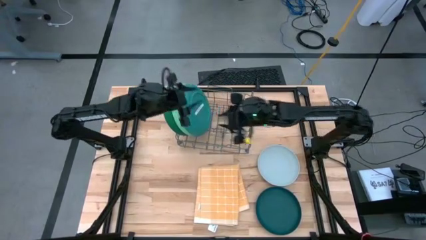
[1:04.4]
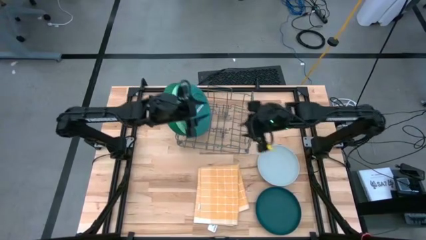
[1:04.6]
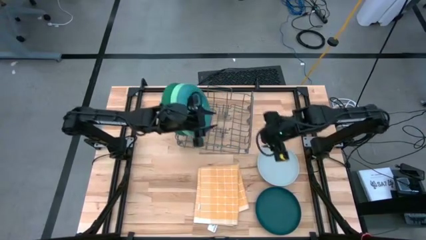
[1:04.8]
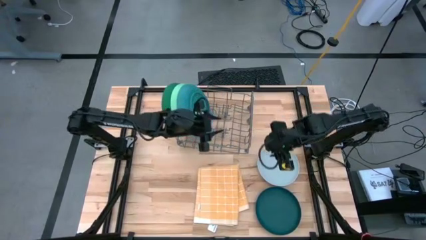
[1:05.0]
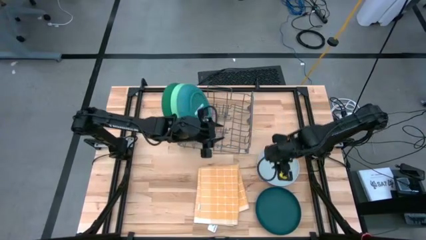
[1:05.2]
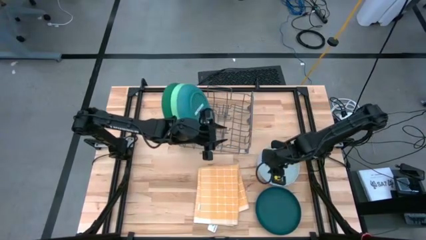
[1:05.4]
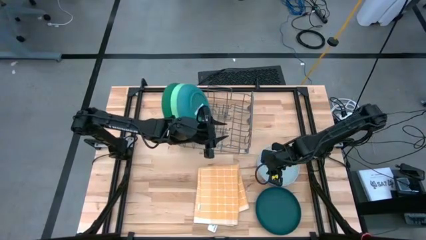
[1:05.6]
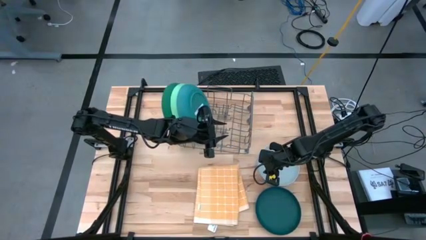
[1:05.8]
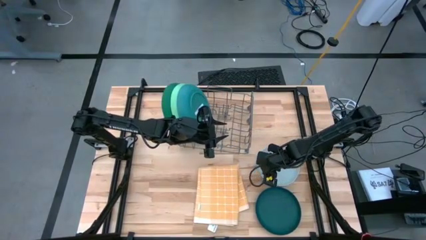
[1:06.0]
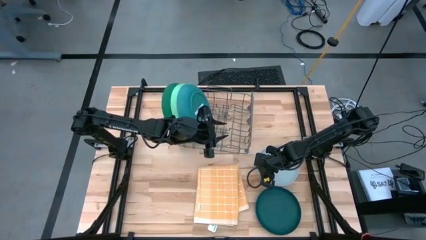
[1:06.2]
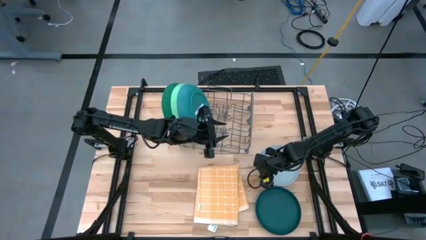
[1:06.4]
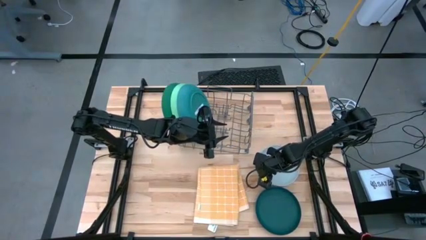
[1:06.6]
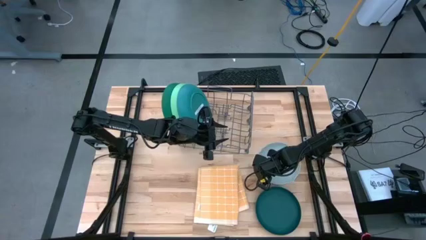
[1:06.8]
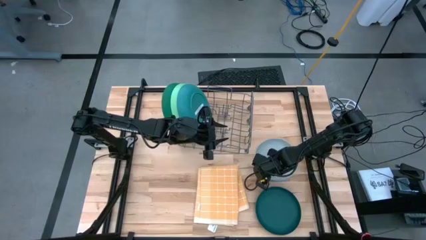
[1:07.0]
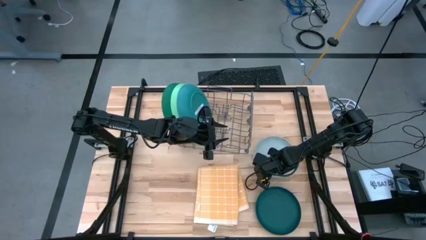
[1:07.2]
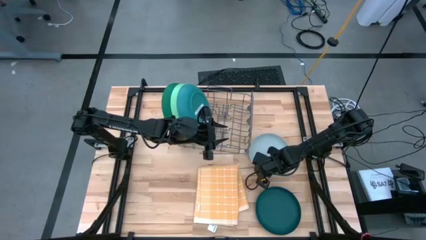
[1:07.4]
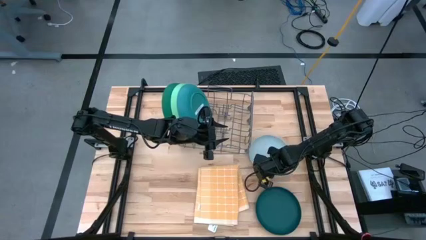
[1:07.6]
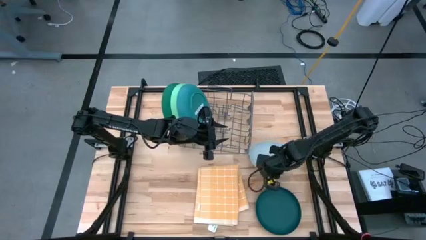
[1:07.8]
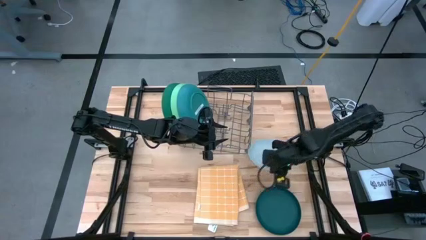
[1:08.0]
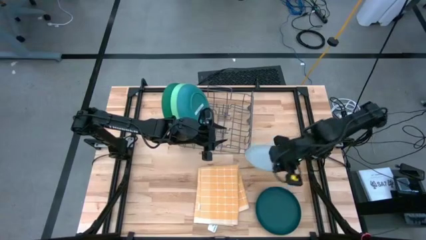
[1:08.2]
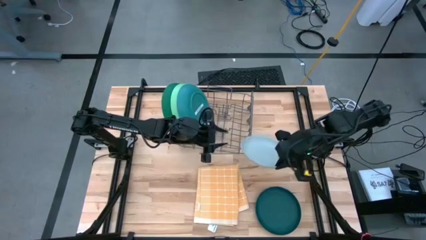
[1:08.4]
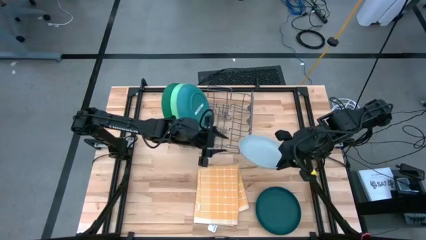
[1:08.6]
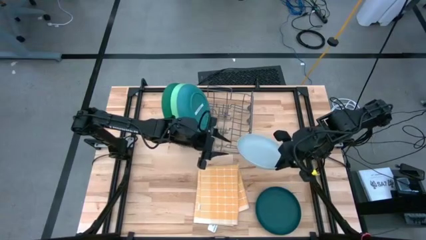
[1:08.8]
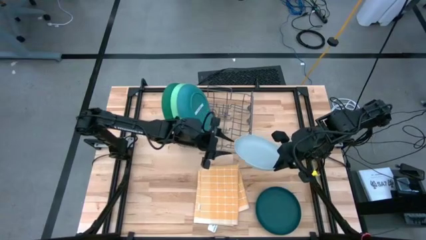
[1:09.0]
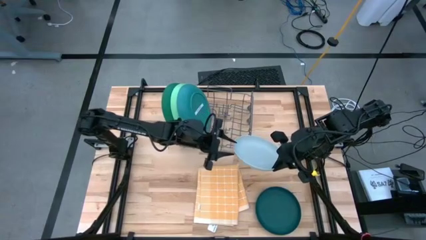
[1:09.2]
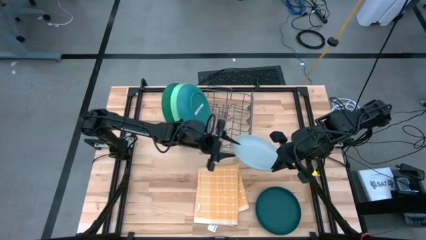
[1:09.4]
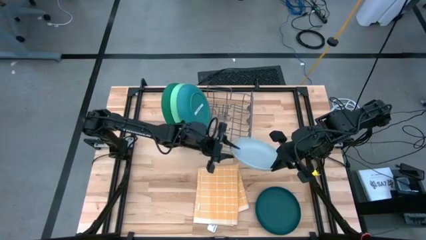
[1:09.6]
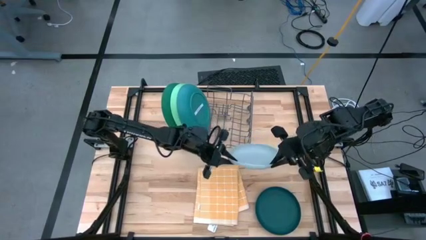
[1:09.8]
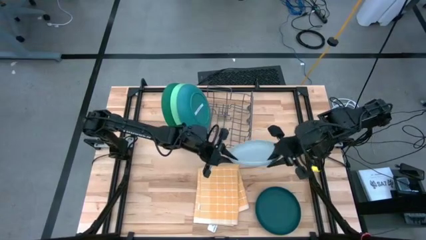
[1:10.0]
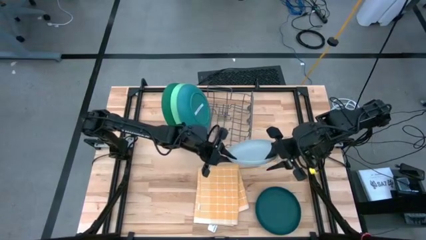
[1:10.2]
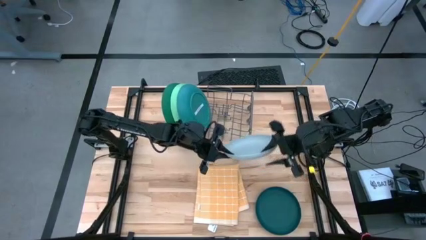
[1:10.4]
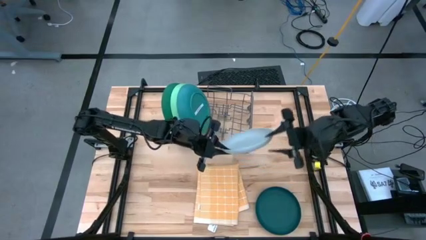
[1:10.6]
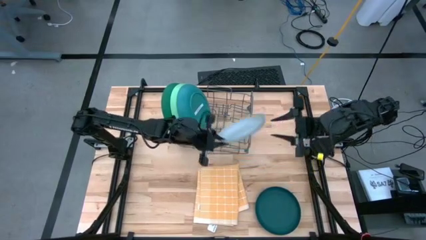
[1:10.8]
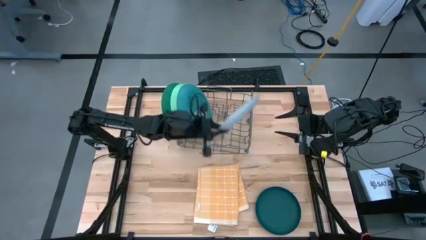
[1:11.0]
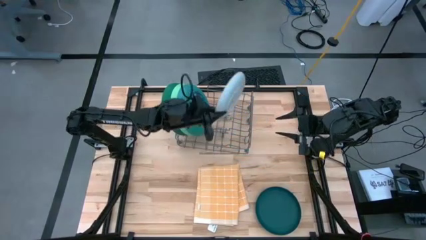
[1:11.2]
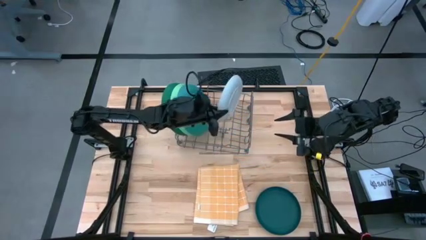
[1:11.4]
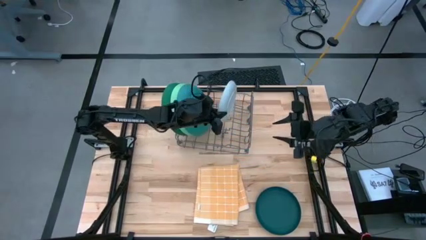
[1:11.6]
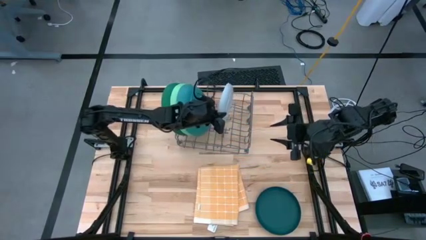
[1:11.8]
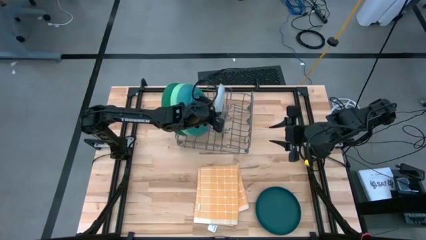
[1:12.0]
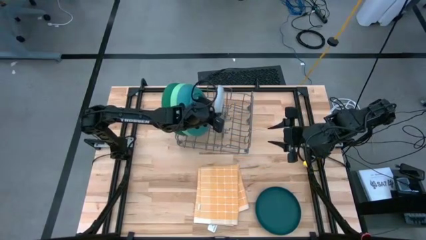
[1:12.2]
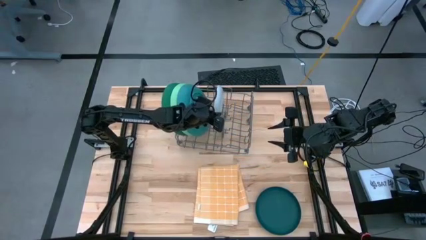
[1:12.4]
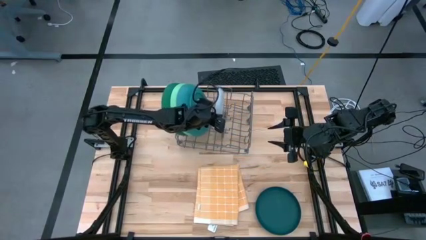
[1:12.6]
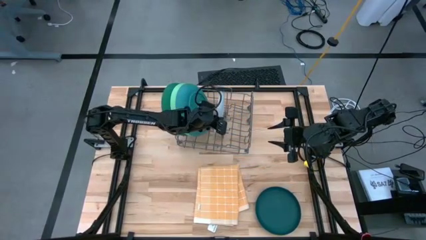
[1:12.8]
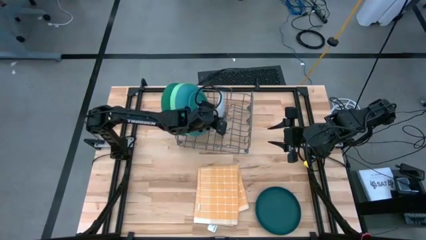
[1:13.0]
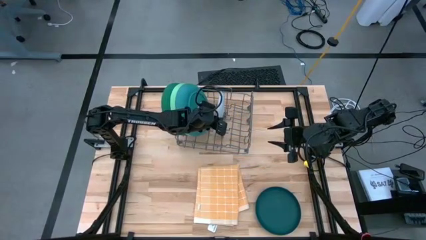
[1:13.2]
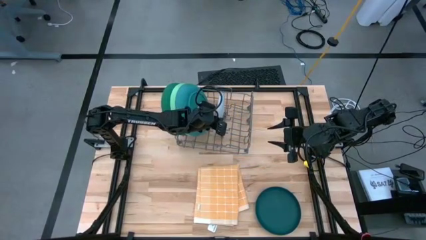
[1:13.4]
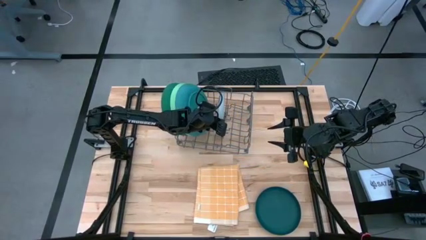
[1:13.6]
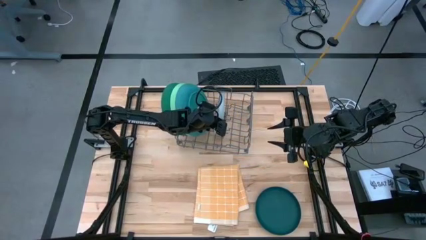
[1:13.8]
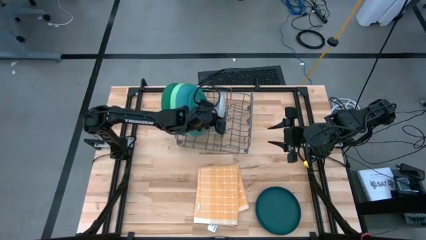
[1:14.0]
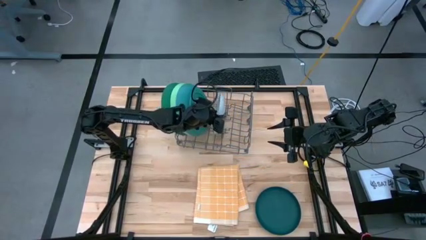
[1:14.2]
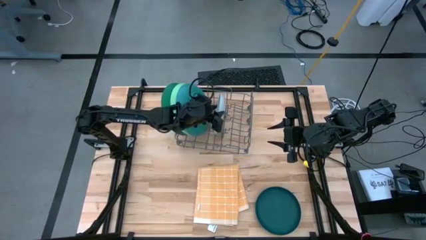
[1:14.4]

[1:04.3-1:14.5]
Task: Sort dishes
Put the white plate in the dish rack

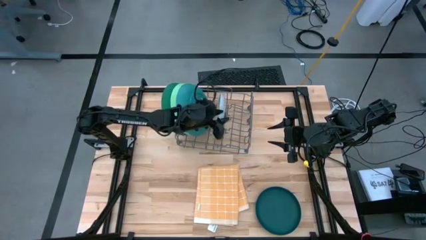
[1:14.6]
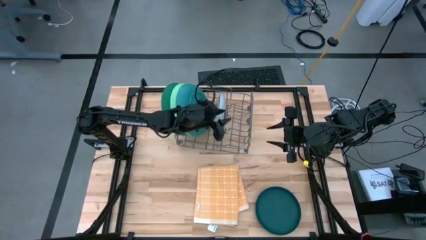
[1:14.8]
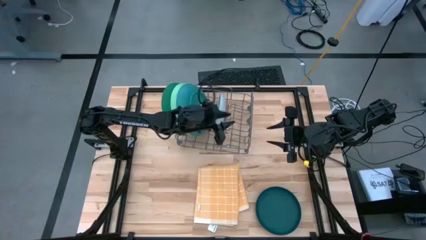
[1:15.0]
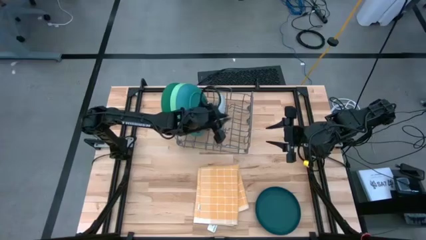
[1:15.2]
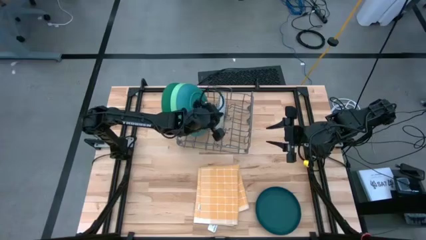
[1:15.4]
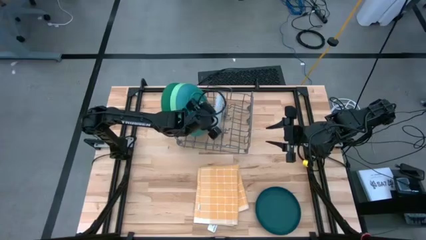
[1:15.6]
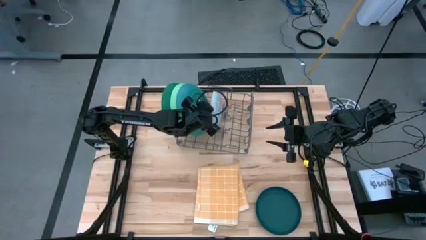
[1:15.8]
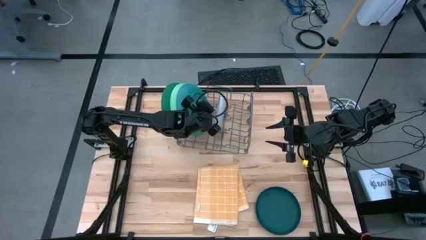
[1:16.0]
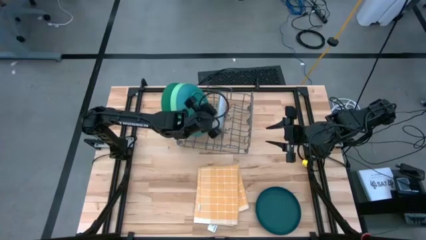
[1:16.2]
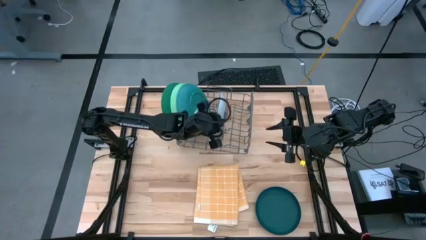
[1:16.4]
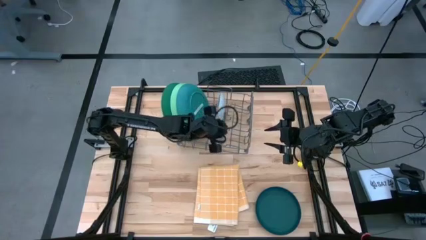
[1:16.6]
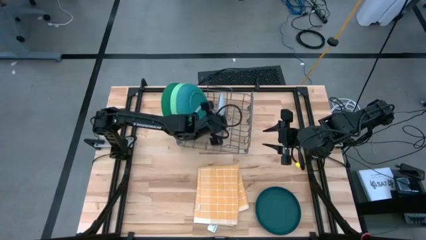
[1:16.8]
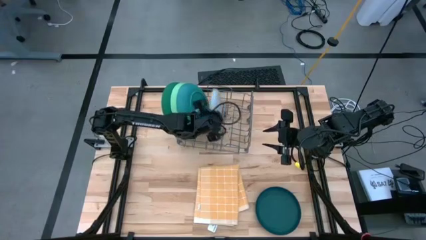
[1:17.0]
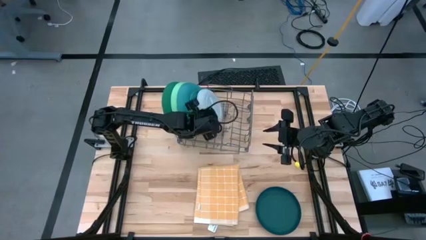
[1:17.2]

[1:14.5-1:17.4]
Adjust the position of the white plate
